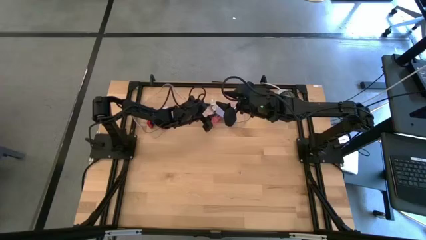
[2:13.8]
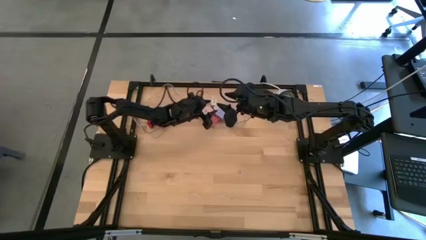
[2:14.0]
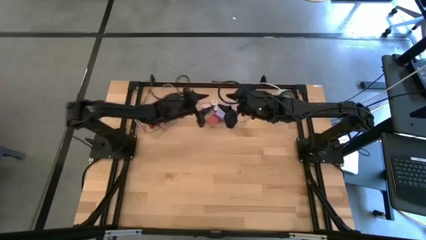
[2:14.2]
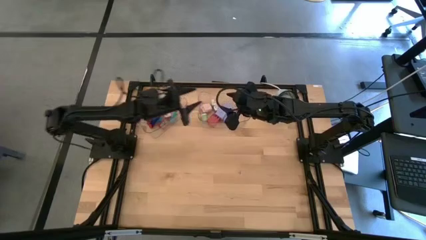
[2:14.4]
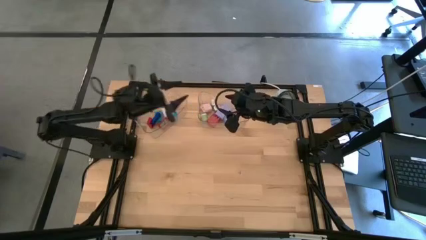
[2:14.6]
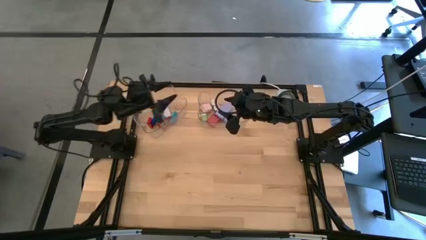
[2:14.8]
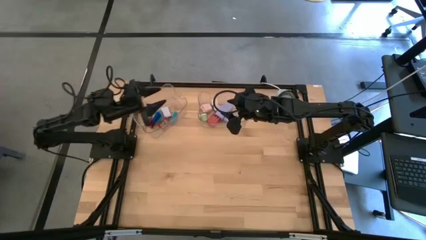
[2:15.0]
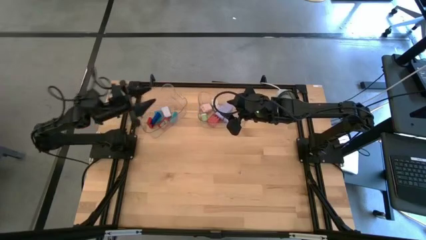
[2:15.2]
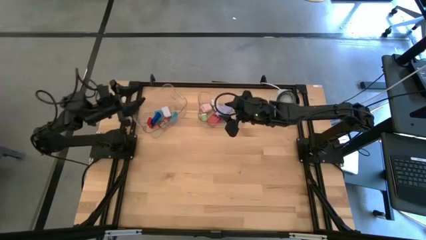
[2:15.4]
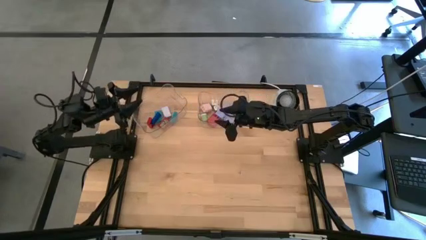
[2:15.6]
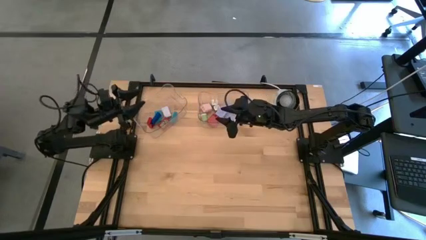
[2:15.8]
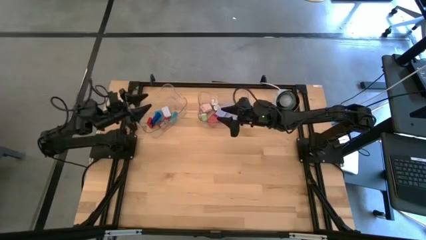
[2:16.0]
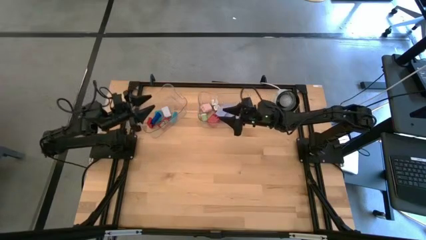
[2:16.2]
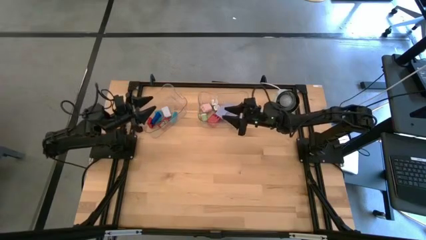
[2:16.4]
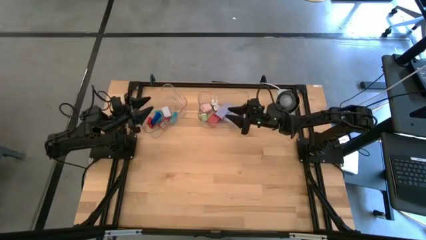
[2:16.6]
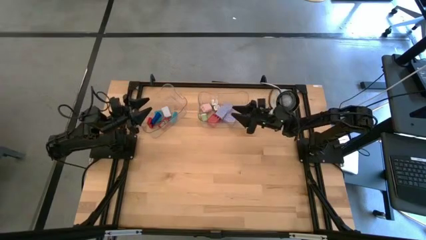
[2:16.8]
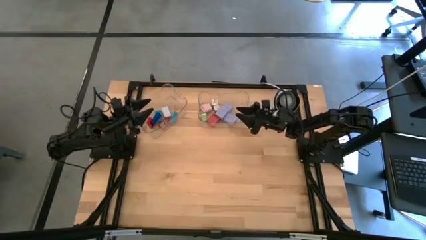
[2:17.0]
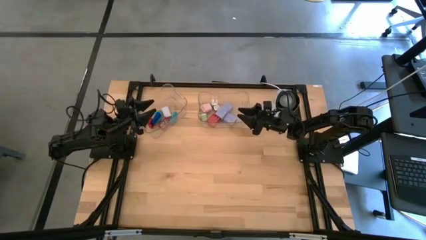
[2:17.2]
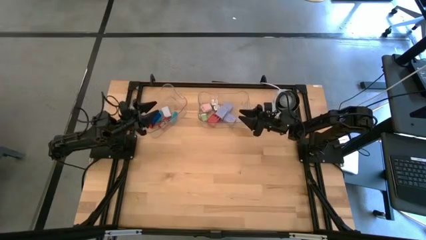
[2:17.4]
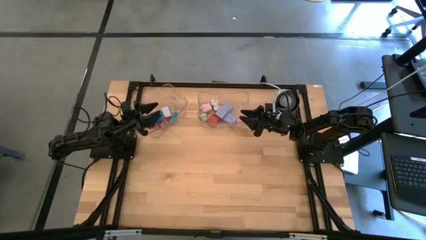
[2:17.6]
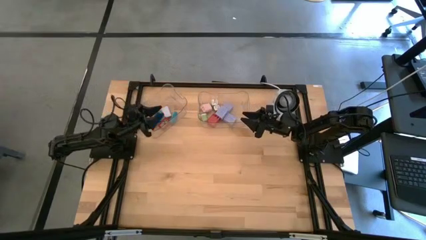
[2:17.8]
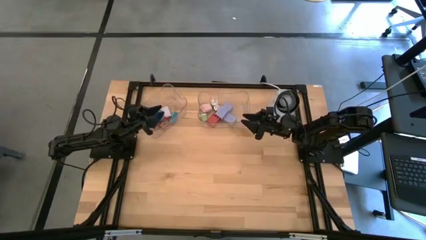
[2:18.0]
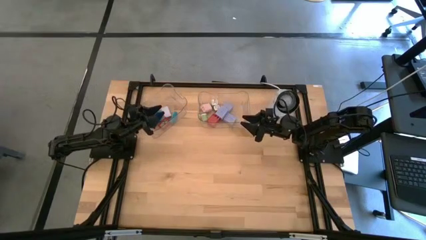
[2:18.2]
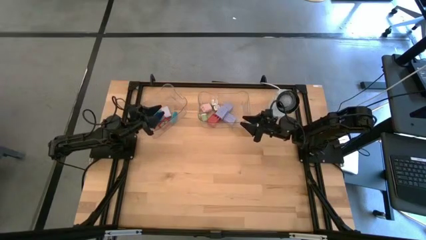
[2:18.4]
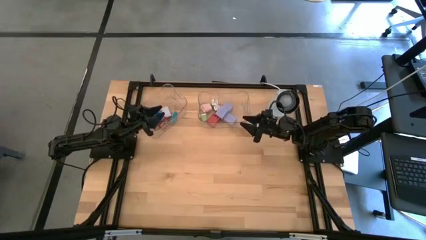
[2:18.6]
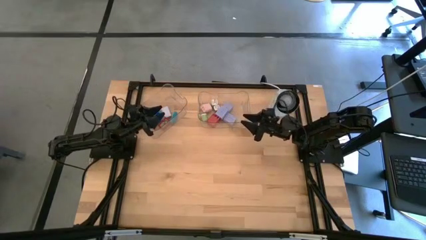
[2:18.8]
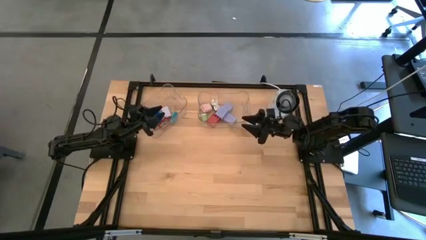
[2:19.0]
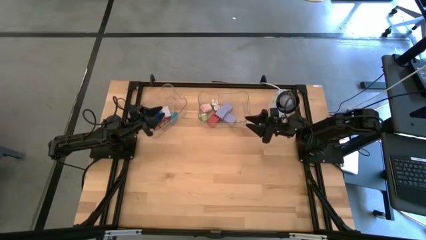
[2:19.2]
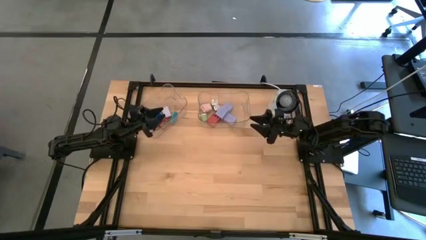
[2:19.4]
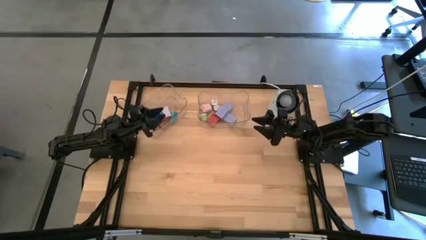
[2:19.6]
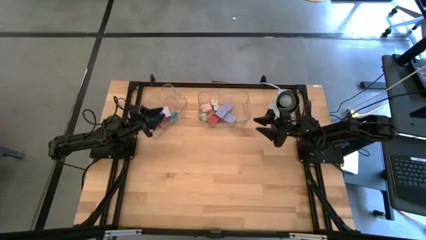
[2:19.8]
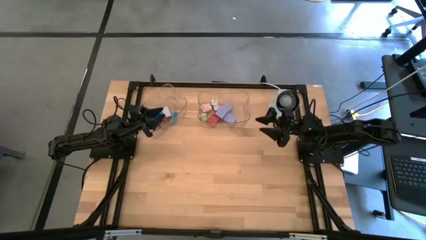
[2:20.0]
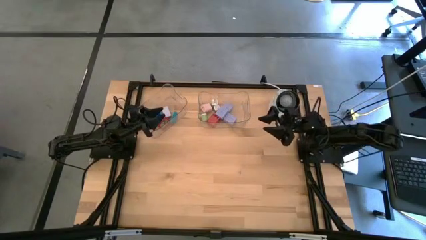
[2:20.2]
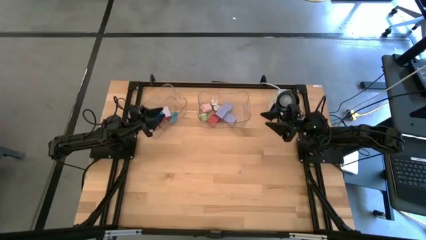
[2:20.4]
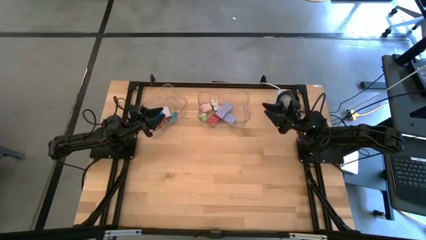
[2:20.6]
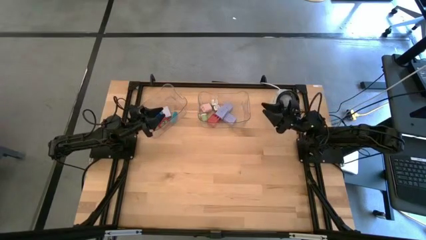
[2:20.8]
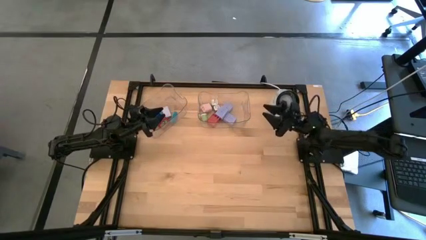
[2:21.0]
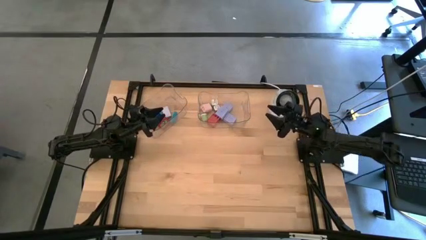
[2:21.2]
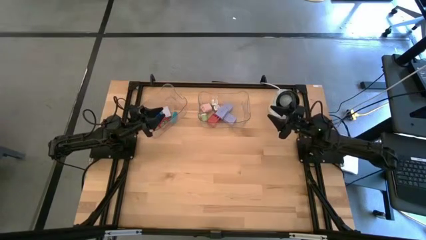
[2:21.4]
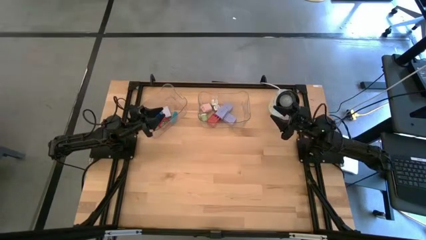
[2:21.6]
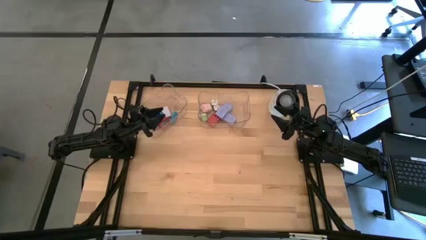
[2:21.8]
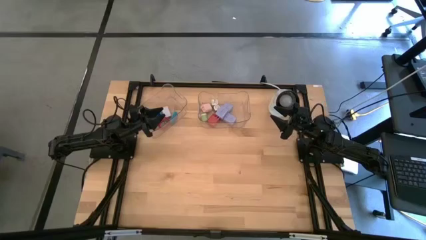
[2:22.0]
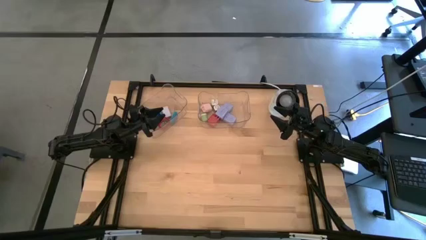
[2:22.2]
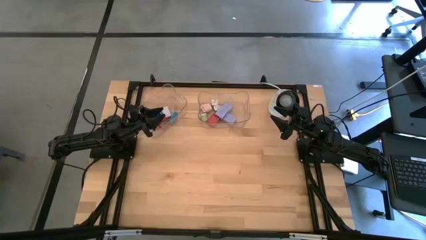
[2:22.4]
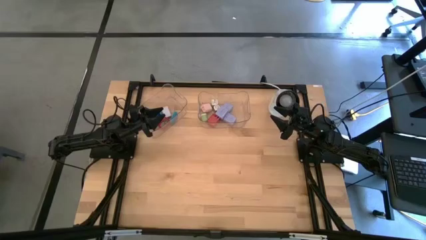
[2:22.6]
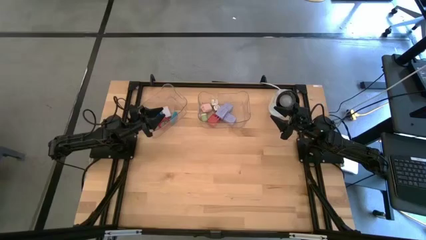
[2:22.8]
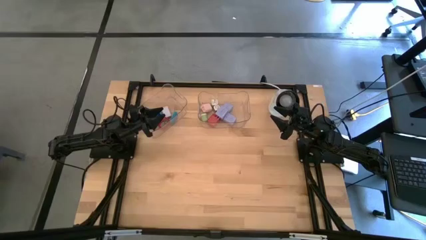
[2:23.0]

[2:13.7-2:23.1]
Task: Pick & Place Office items
Return to Home Position

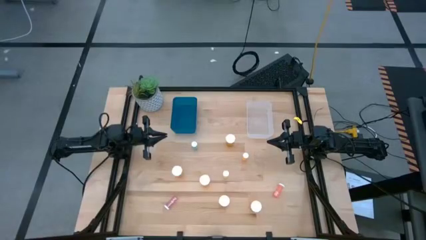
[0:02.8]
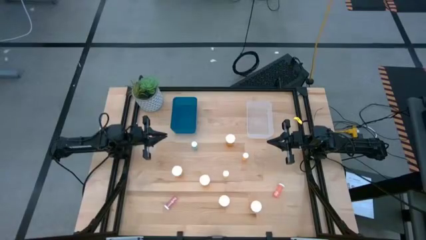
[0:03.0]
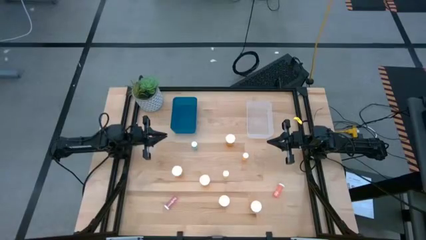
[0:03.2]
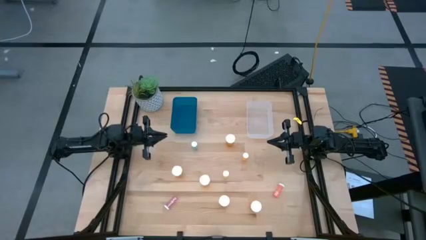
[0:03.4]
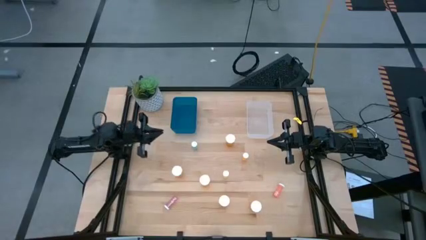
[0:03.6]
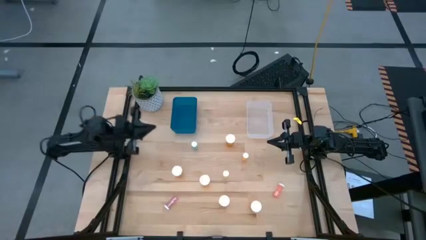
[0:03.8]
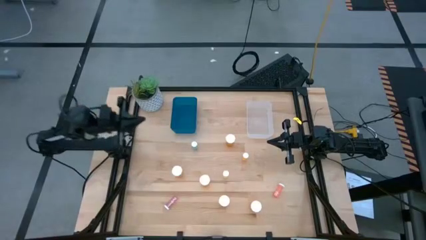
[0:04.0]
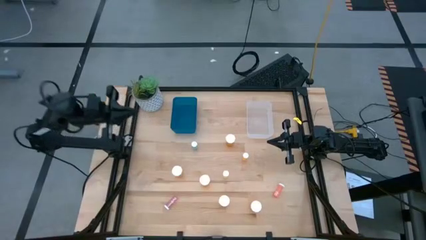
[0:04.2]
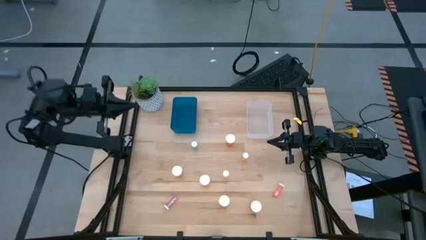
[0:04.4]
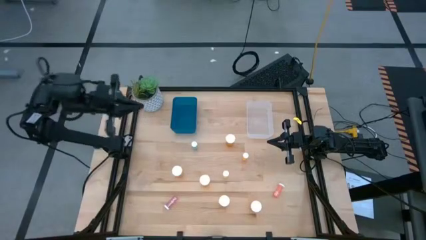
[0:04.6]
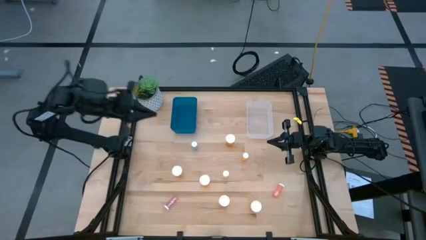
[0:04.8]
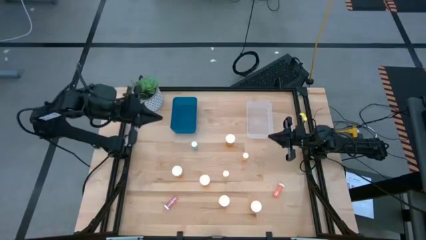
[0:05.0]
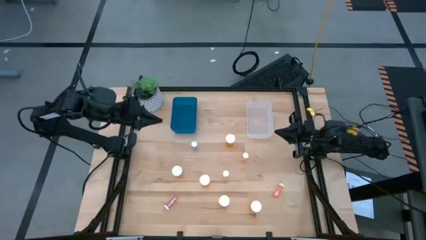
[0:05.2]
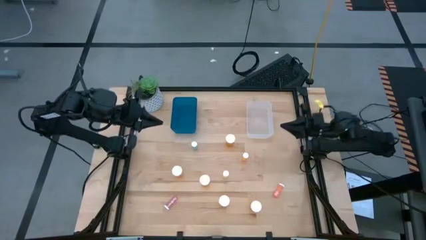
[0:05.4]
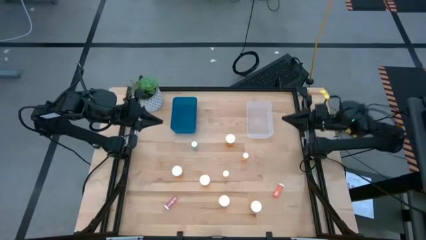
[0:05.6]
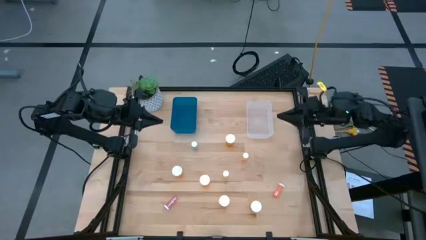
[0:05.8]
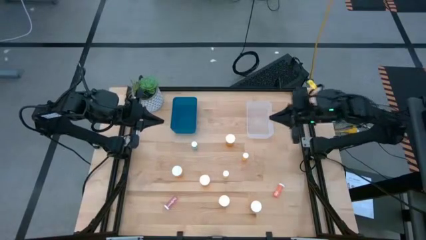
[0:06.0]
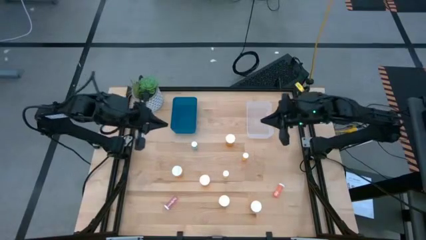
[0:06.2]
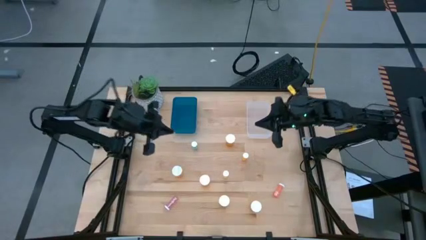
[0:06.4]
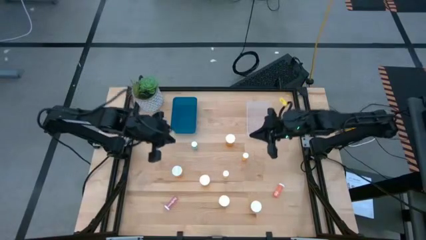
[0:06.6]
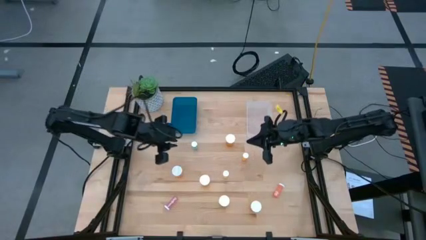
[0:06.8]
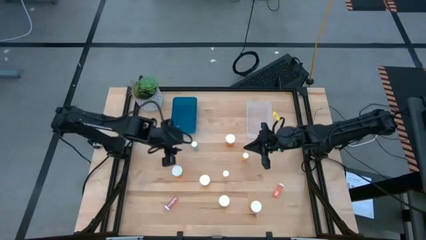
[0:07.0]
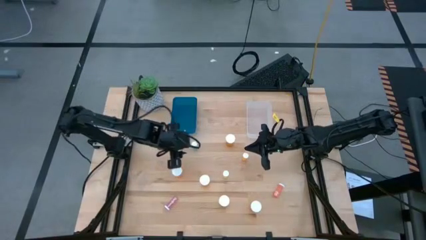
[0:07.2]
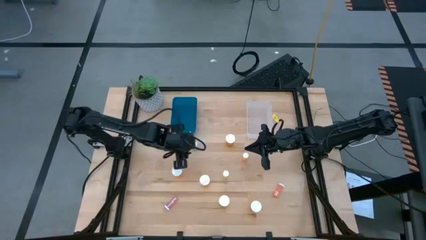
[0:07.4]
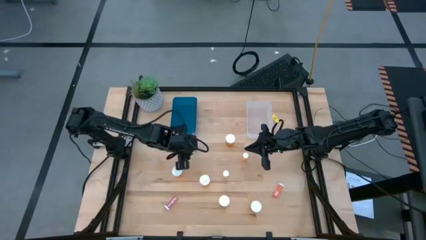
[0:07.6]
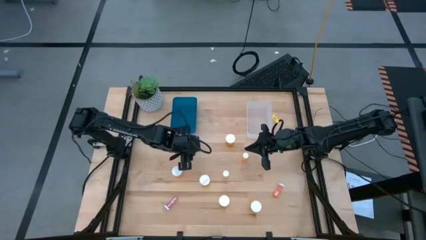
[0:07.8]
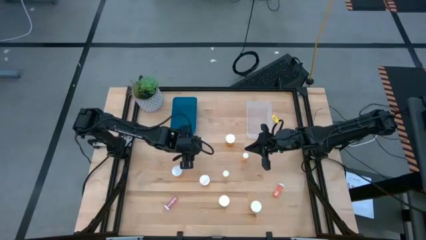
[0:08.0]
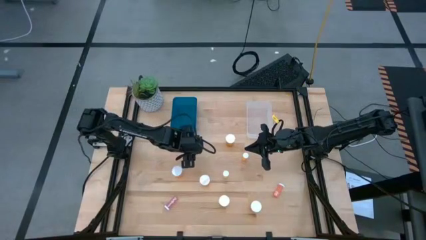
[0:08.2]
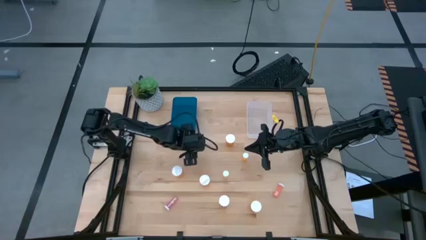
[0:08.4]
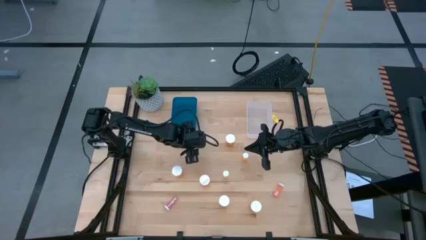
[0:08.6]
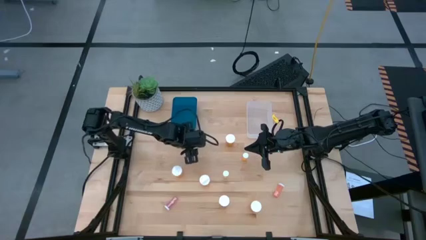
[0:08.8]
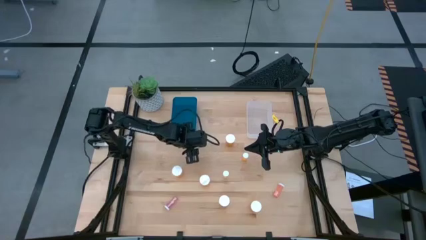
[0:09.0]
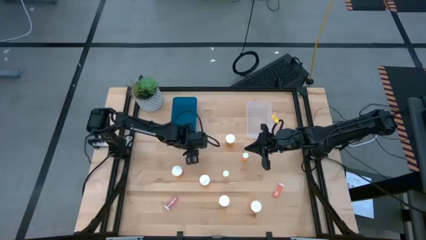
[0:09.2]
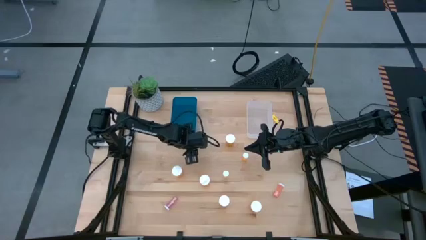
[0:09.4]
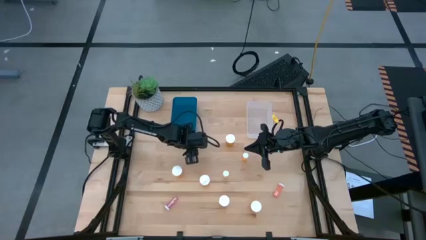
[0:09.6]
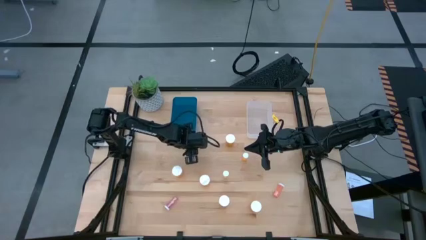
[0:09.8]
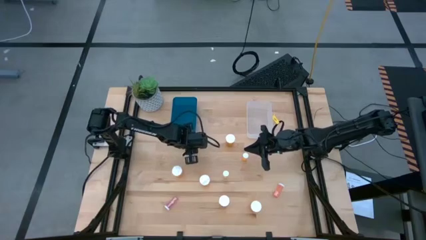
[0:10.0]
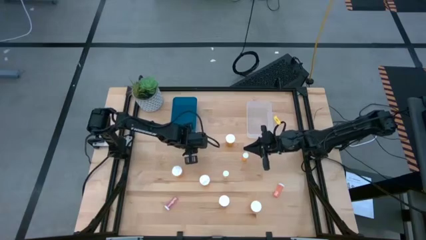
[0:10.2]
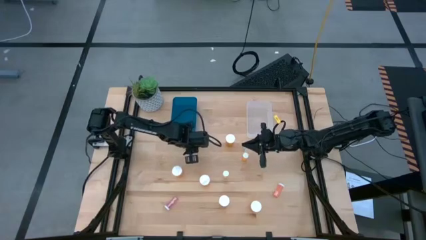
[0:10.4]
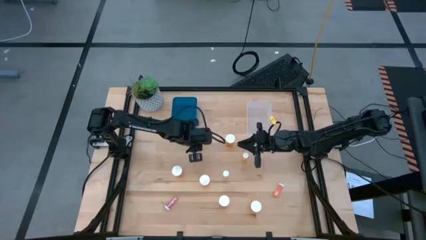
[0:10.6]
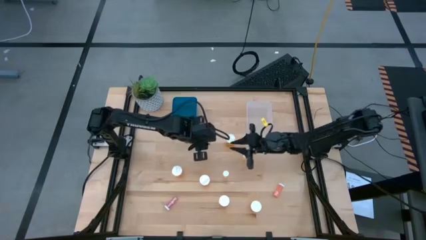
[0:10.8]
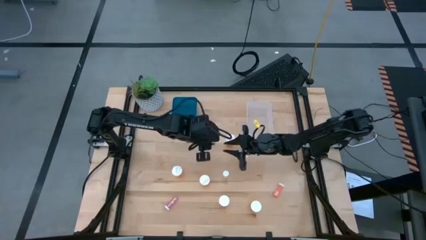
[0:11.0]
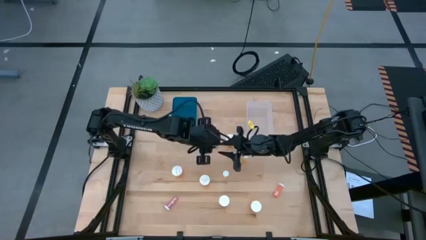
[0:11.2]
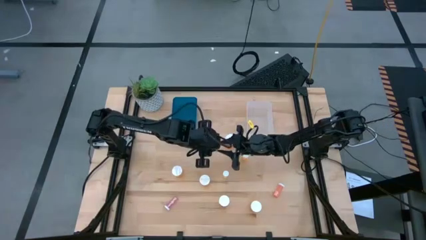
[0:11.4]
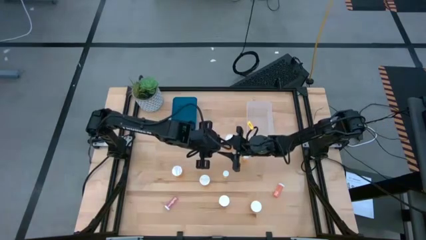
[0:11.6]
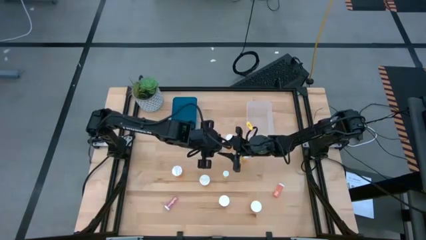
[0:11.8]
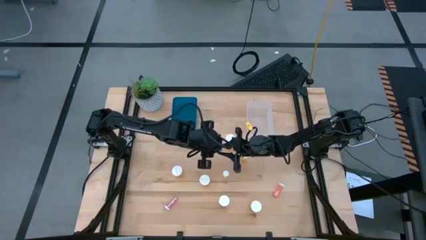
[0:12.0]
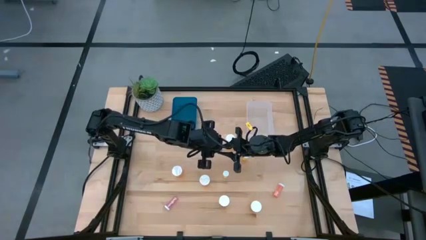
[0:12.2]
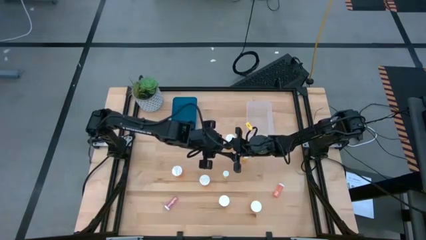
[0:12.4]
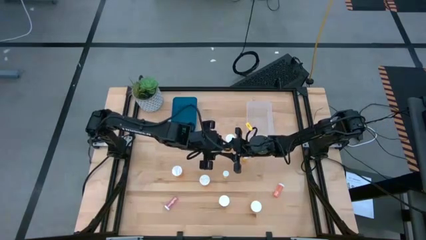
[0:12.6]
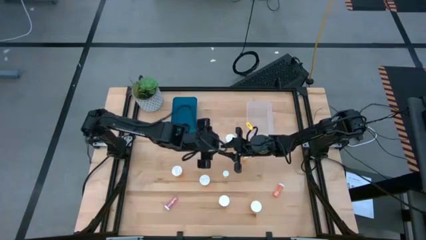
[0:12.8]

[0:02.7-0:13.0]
Task: Pick and place medicine bottles into bin by pill shape (circle, oval)
Put the small blue pill bottle into the transparent bin
